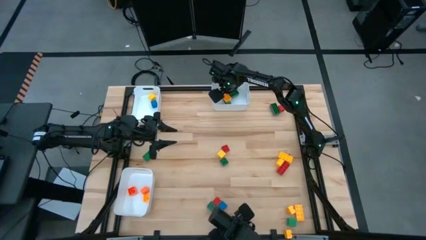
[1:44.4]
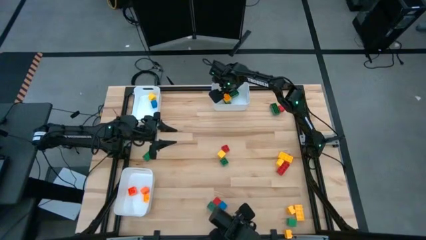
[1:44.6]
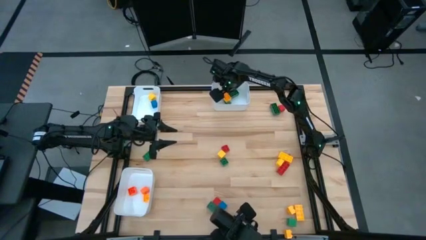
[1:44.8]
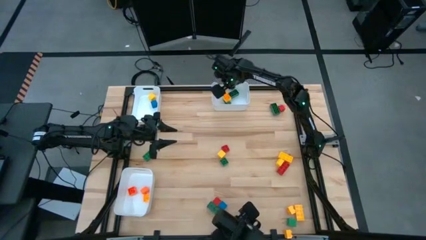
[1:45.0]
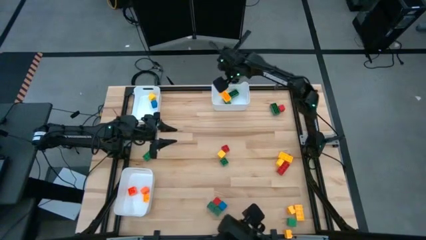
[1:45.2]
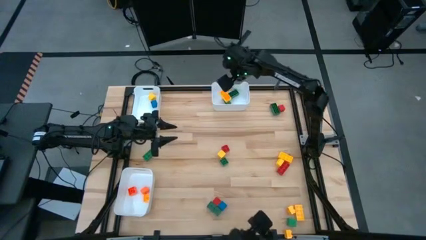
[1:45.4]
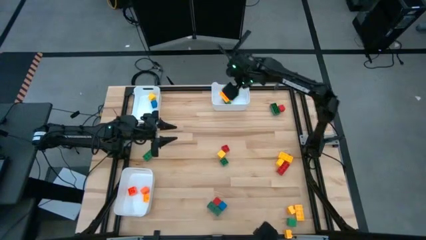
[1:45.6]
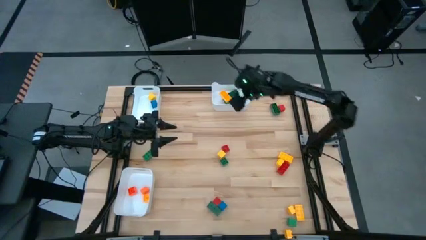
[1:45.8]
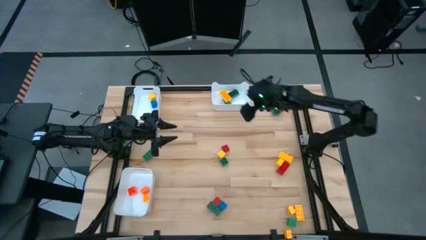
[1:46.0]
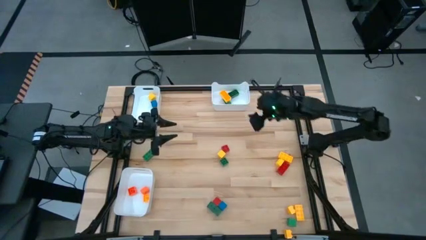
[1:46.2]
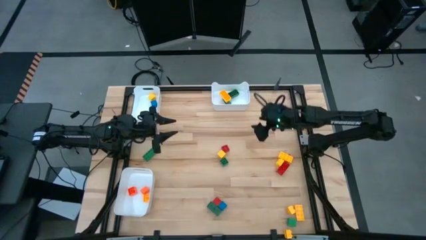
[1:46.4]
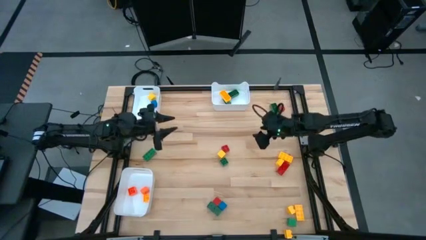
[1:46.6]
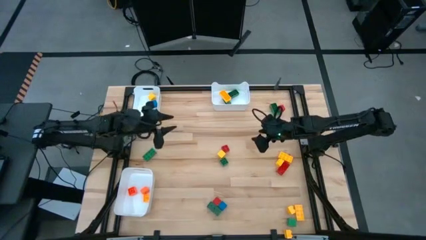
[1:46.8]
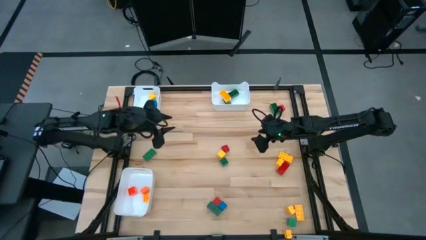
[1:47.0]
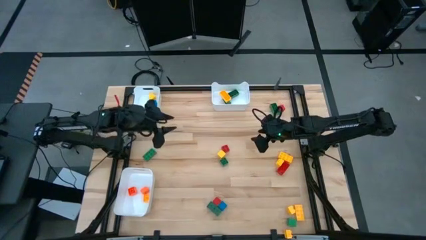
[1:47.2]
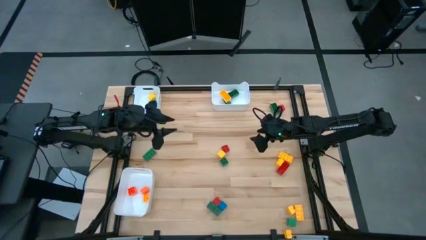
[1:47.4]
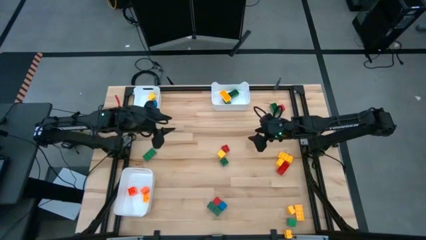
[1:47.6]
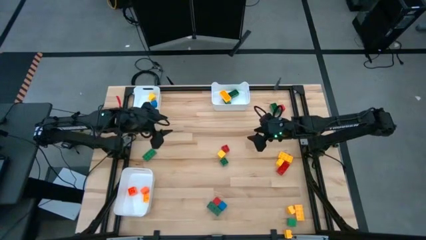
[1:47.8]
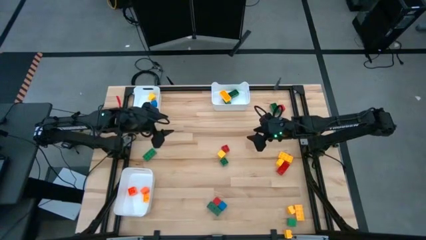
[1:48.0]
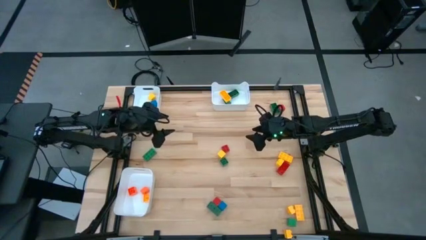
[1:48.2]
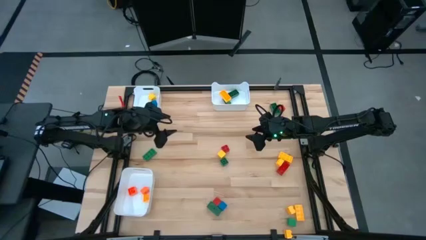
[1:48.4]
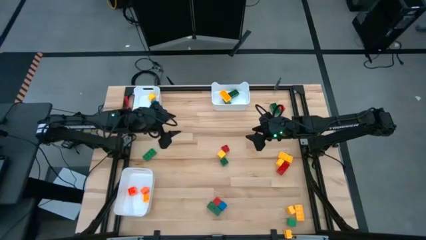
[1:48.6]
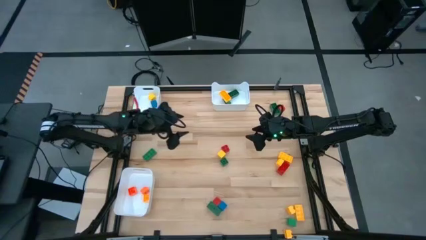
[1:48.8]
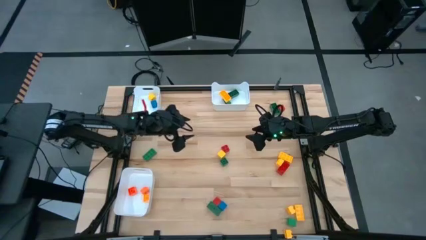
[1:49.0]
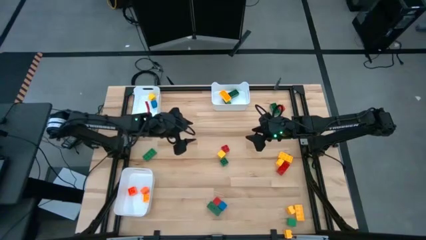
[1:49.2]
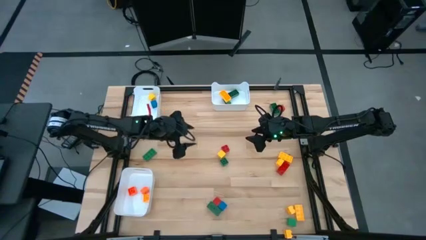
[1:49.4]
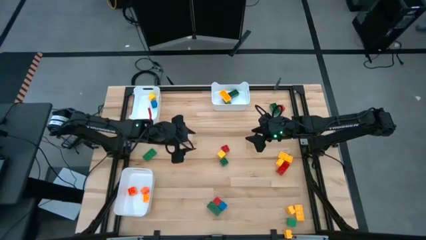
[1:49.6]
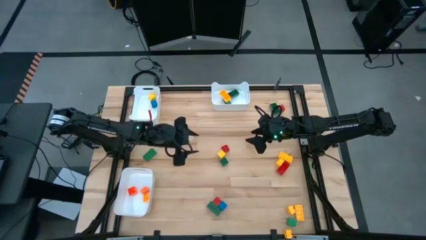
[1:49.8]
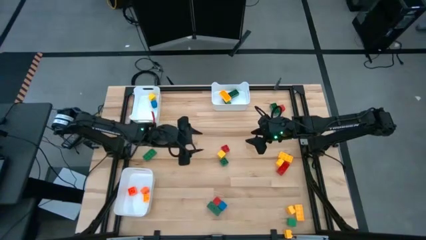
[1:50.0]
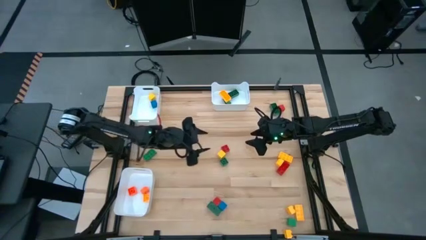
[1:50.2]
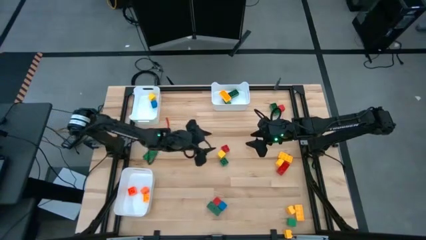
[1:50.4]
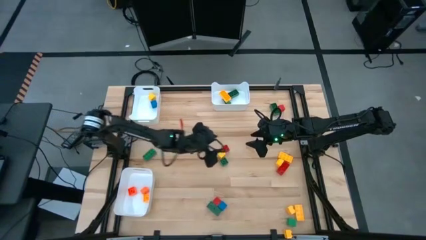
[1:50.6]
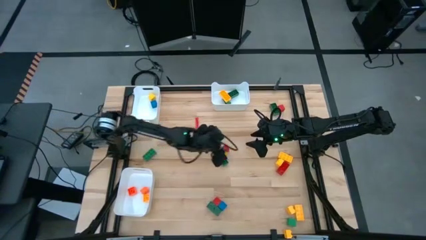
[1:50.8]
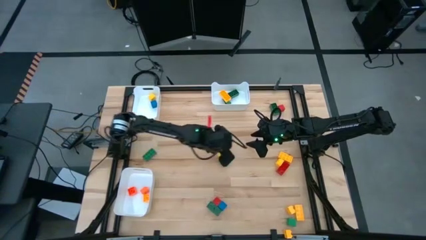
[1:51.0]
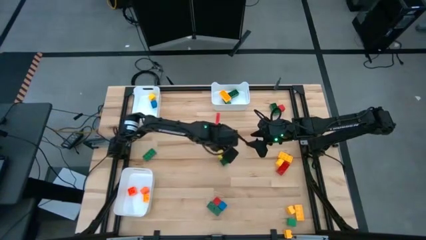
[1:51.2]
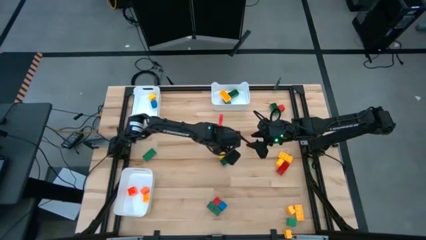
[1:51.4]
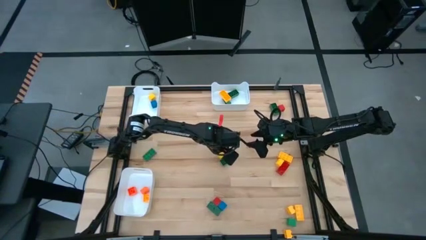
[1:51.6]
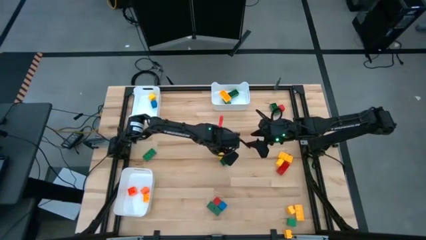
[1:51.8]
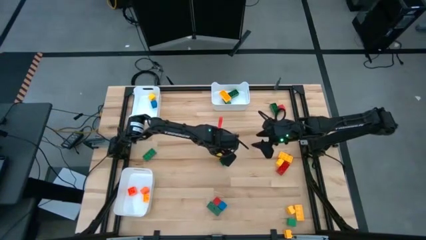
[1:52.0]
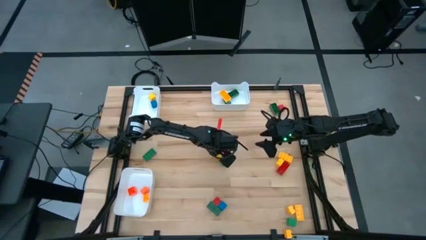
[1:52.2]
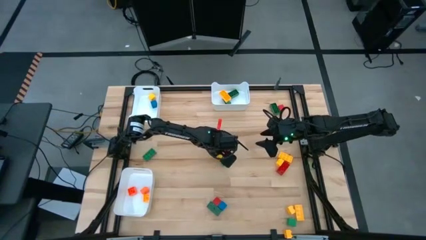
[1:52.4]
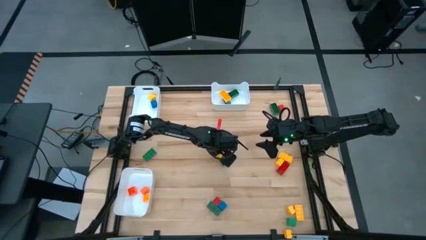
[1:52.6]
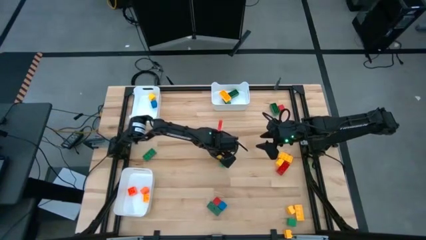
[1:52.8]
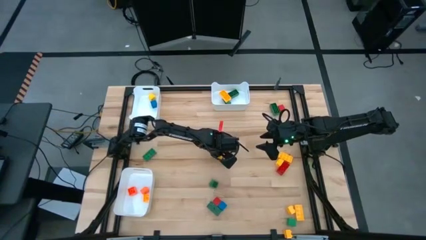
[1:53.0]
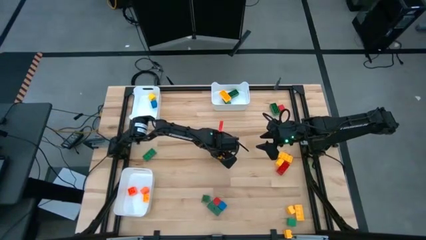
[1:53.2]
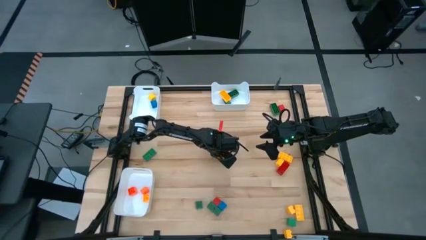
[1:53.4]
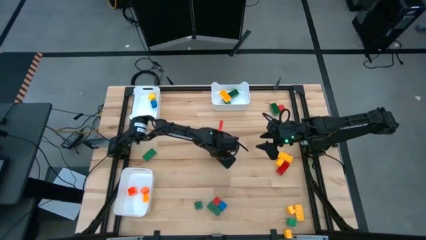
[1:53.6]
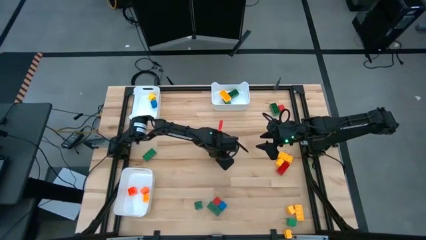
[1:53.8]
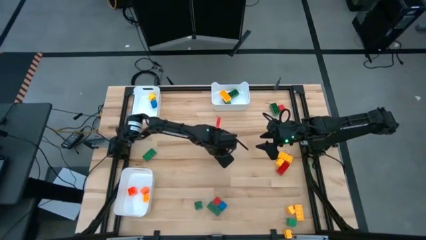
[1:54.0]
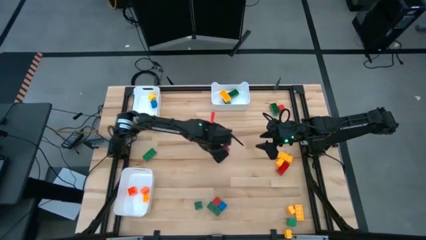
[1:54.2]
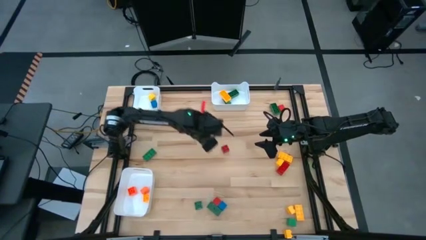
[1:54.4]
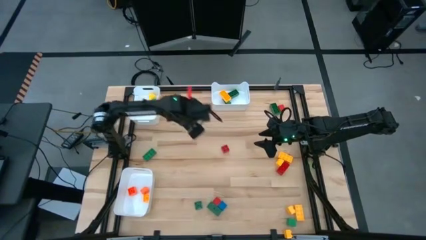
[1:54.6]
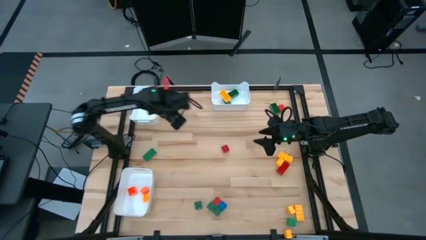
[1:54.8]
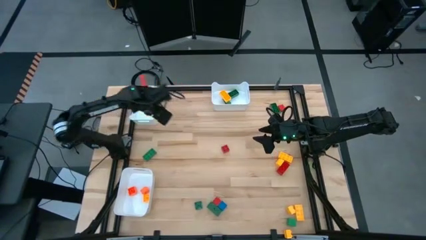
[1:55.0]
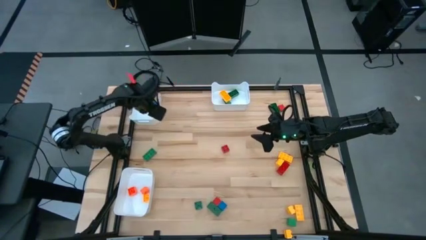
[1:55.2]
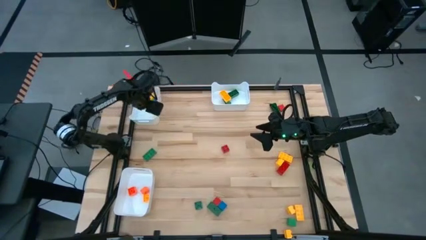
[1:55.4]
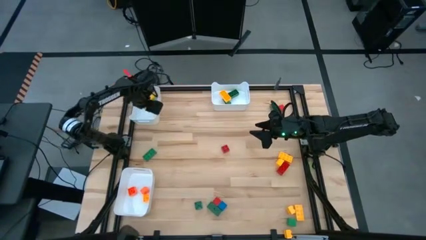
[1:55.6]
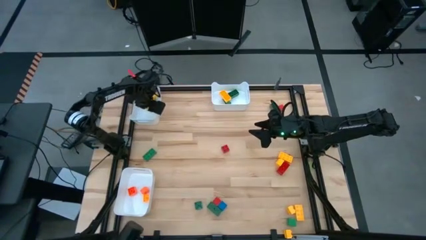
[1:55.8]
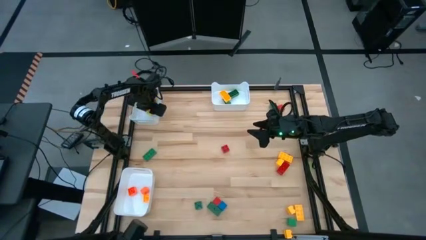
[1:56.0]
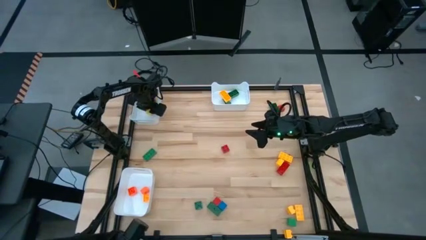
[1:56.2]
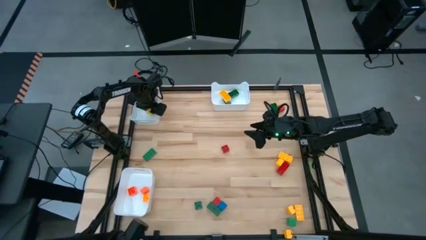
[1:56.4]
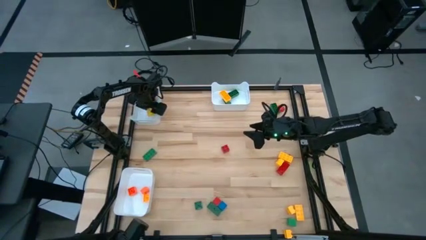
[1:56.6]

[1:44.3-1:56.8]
Task: Sort blocks by size
Put the yellow block into the top left white bin

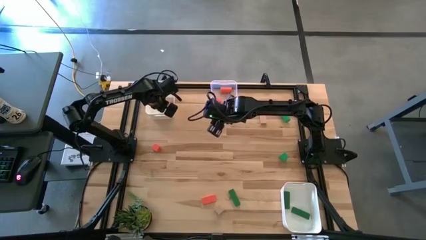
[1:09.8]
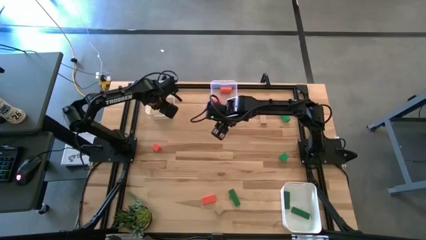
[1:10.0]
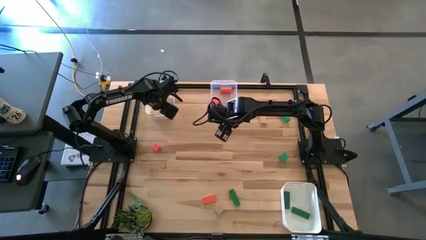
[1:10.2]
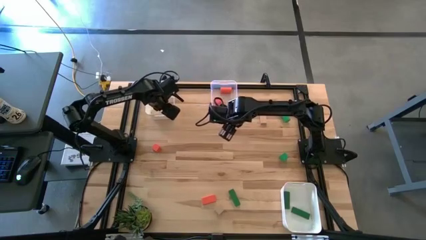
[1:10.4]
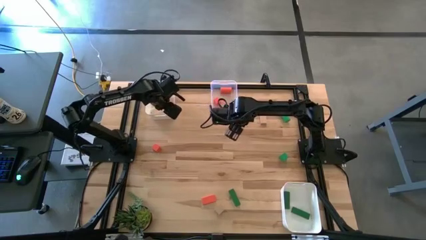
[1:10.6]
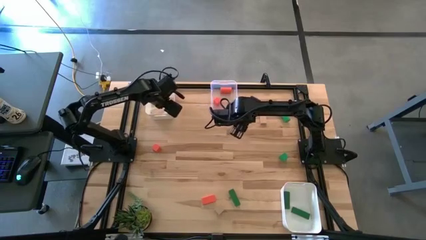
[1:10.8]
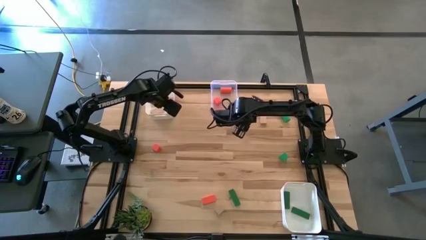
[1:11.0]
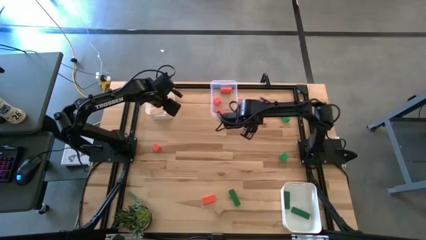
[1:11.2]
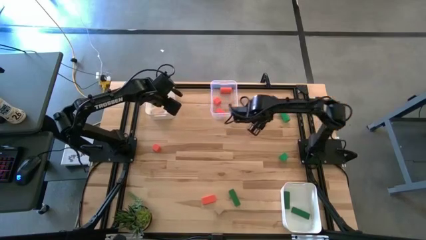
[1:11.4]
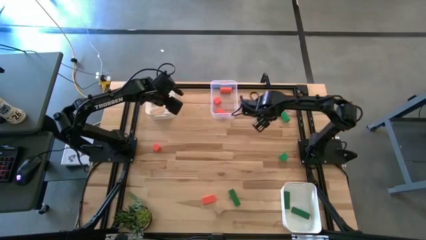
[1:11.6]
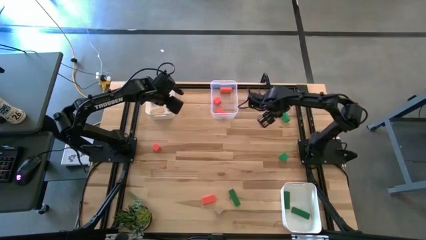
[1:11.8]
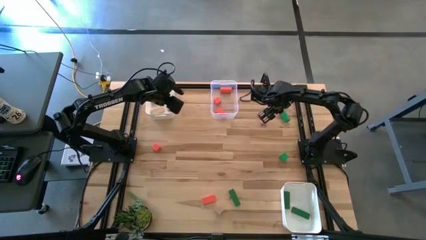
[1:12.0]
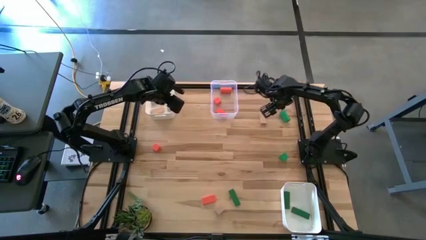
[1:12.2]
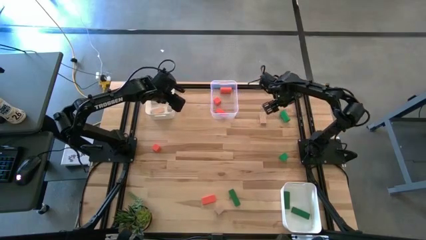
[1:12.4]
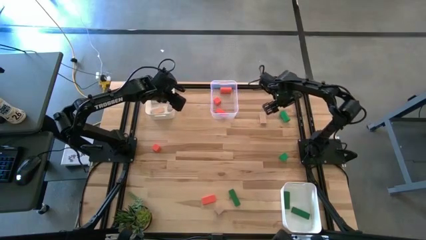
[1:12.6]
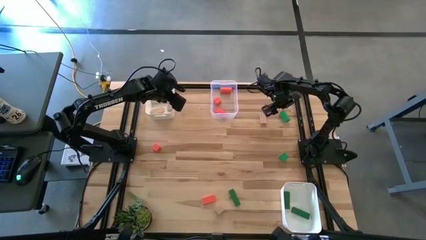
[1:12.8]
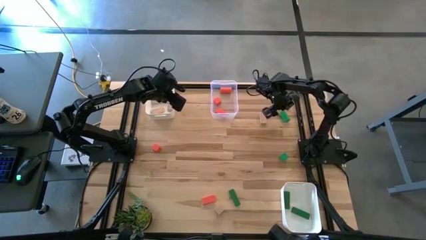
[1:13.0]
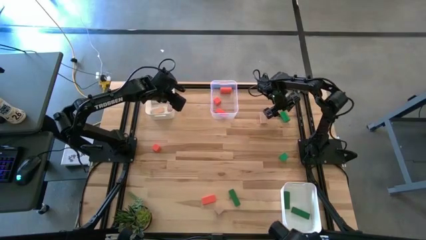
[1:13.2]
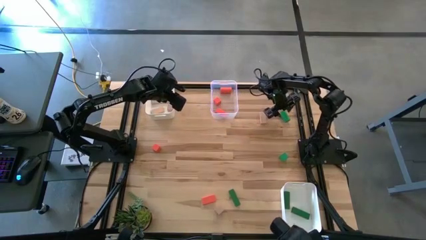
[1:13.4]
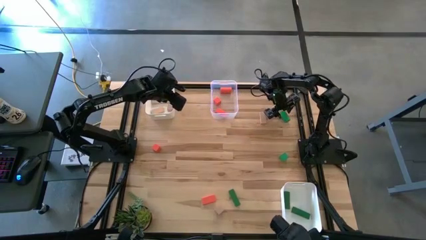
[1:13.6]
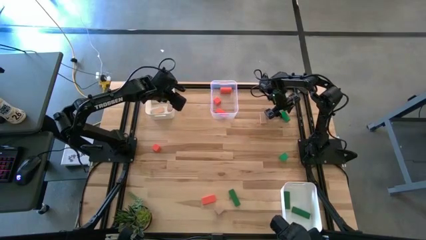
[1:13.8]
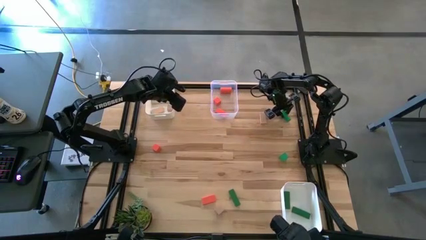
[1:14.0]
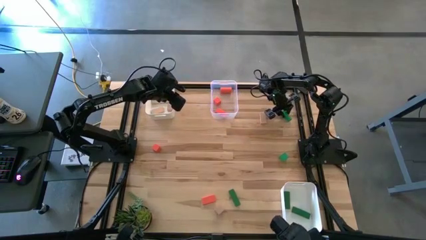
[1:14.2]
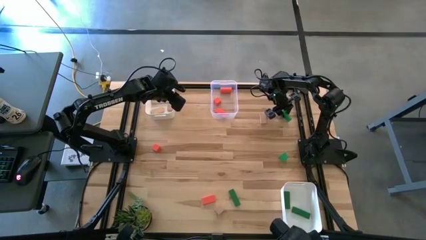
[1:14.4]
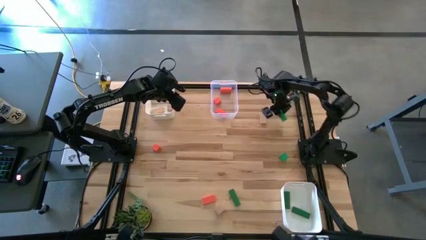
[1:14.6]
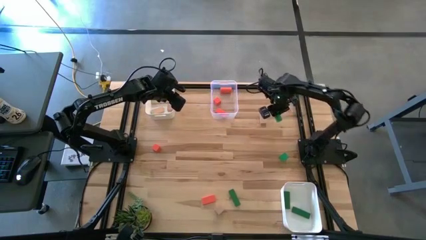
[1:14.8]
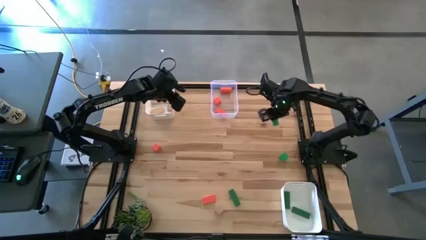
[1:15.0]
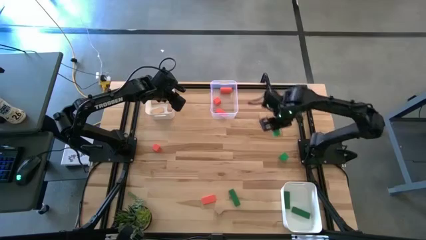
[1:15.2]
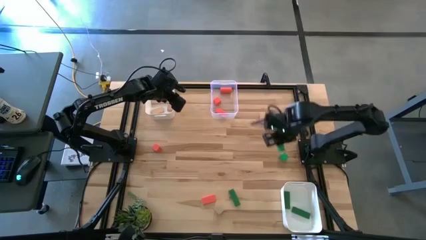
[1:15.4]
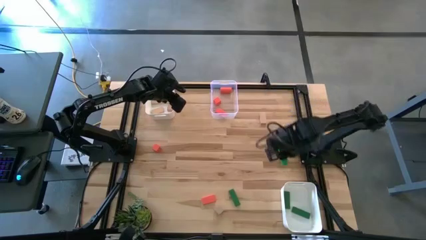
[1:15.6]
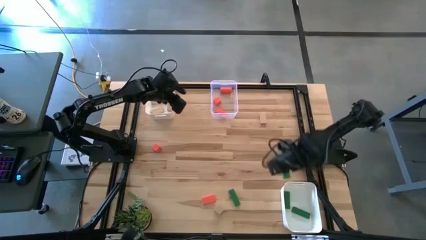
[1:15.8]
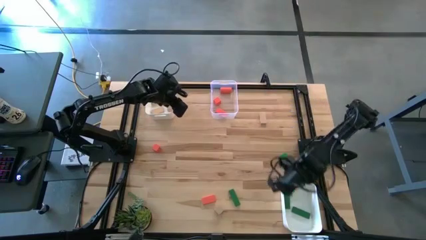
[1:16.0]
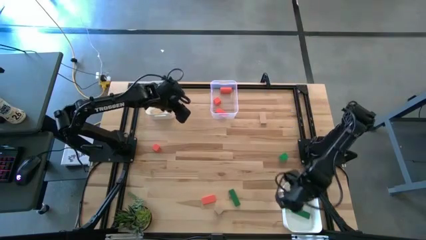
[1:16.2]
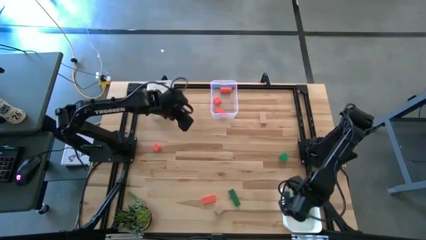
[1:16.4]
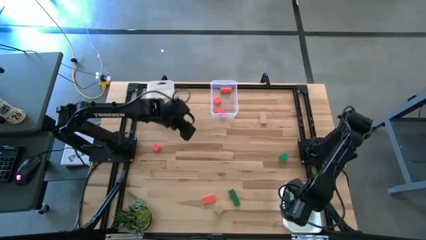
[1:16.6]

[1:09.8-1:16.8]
Task: Sort & place blocks by color
Put the green block into the bottom white bin
